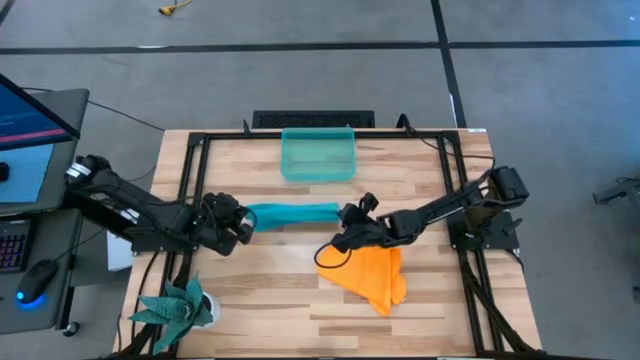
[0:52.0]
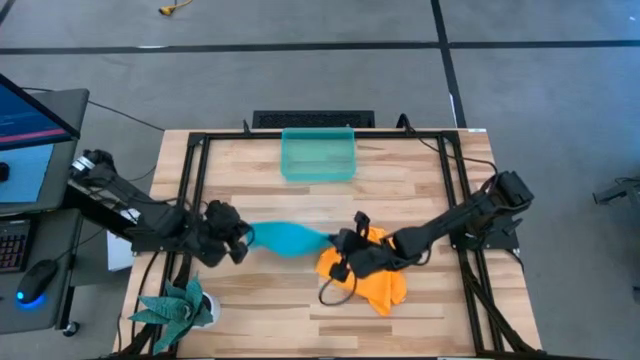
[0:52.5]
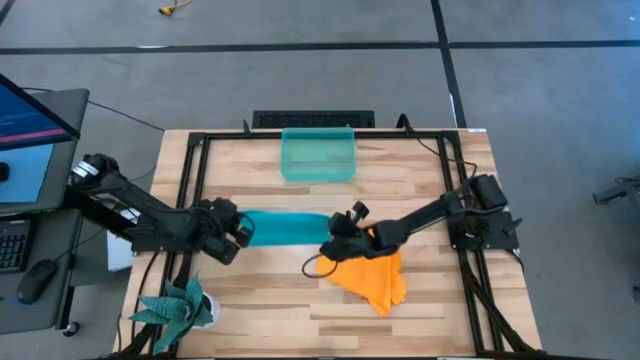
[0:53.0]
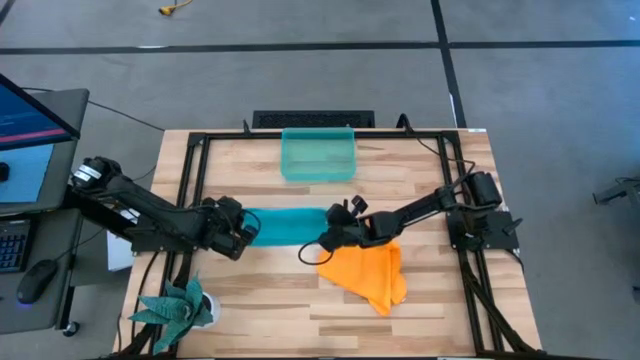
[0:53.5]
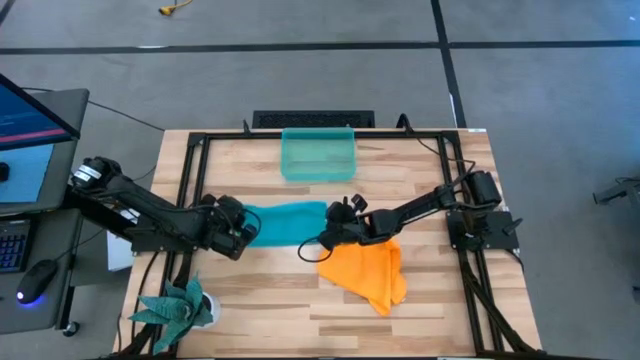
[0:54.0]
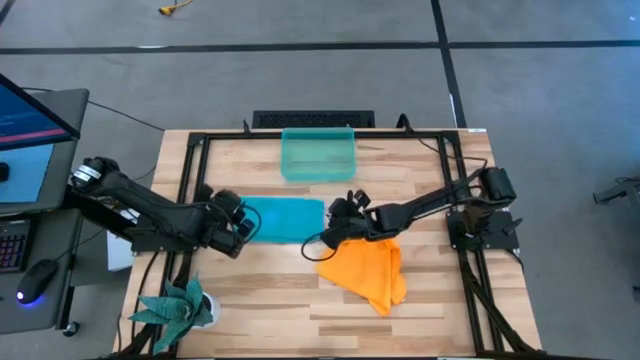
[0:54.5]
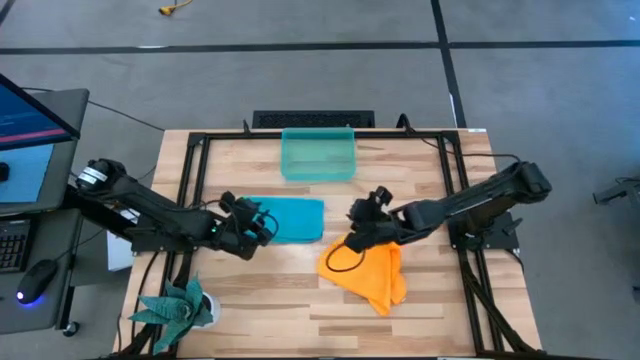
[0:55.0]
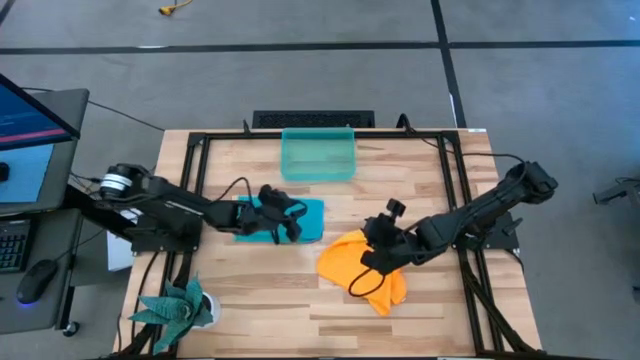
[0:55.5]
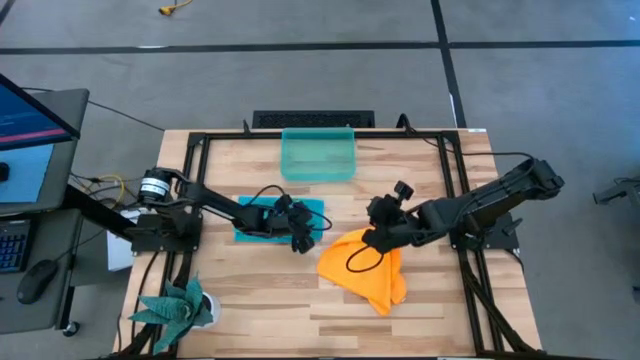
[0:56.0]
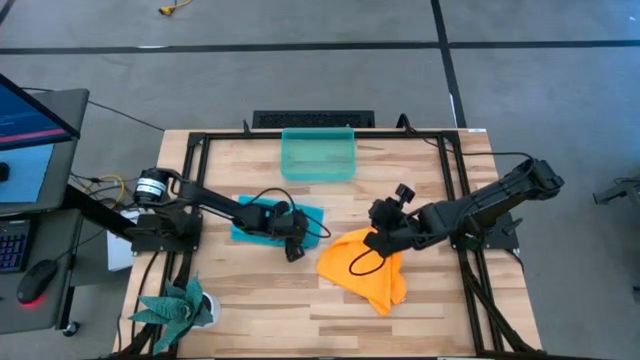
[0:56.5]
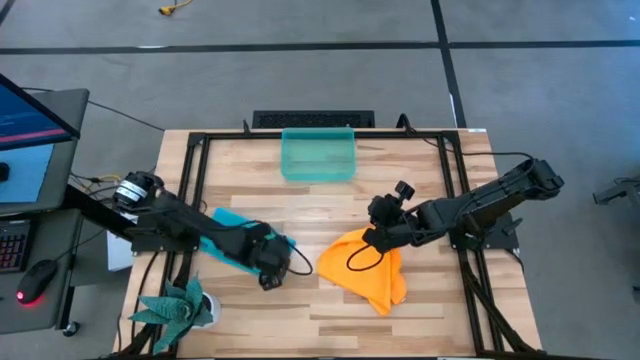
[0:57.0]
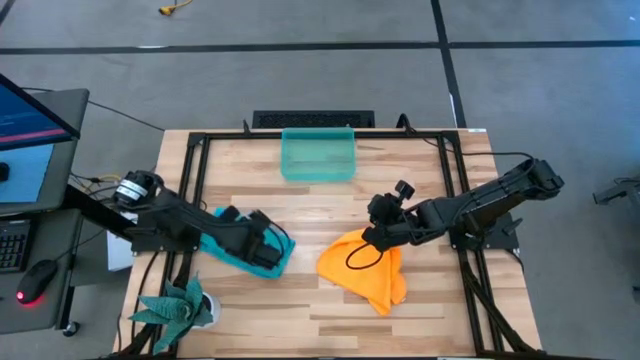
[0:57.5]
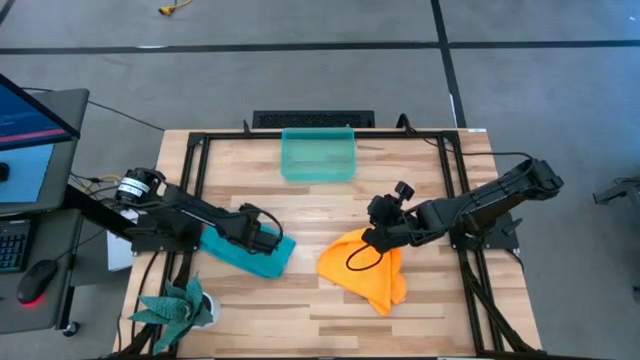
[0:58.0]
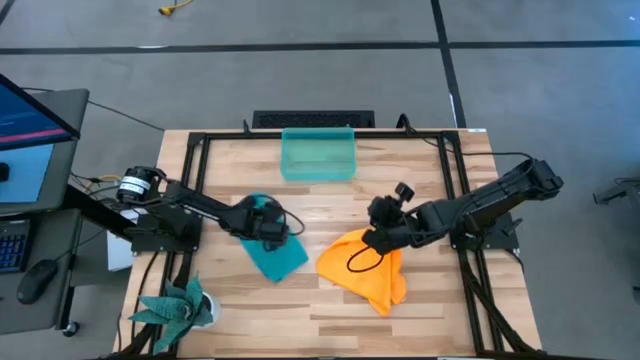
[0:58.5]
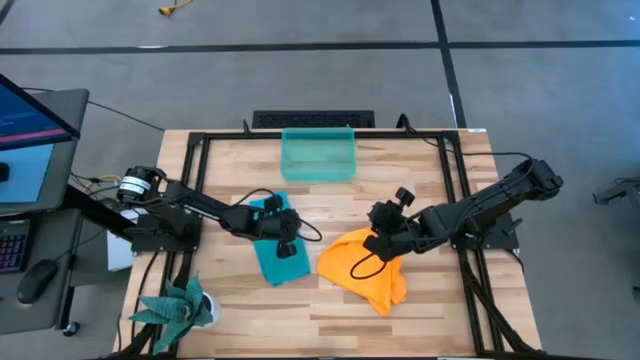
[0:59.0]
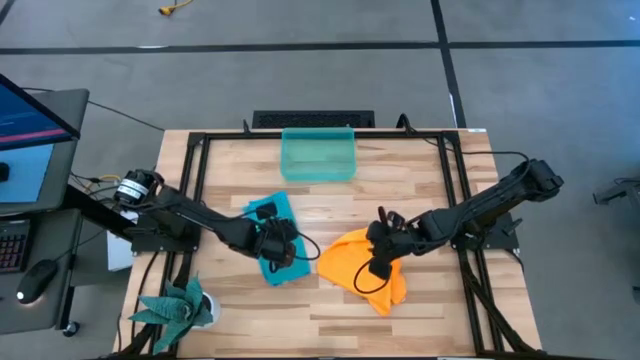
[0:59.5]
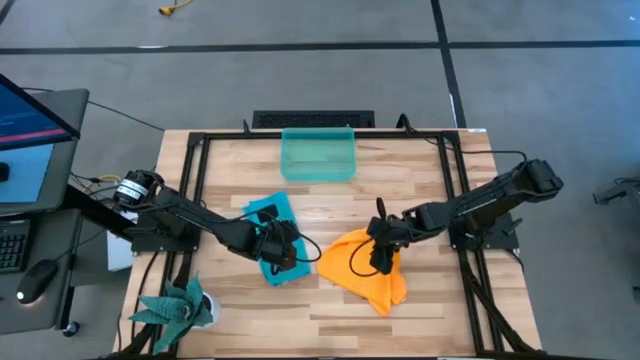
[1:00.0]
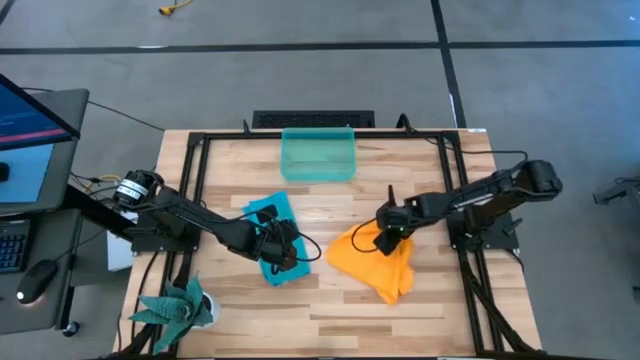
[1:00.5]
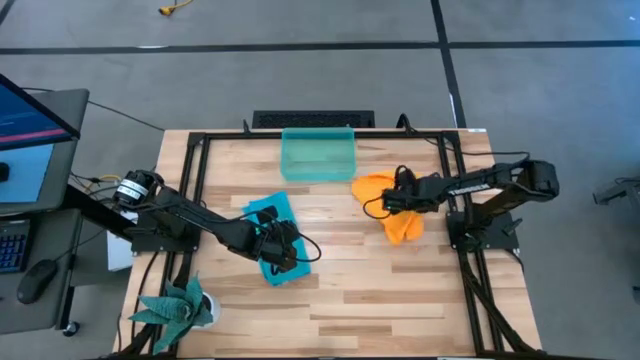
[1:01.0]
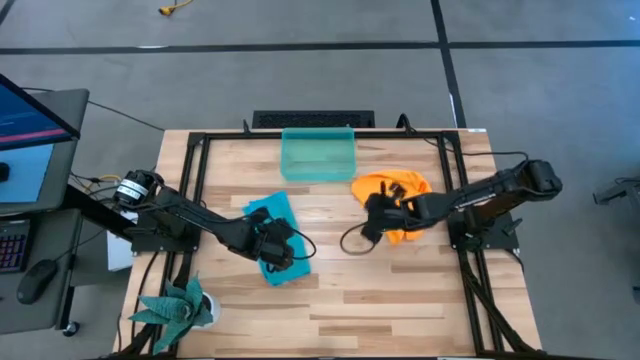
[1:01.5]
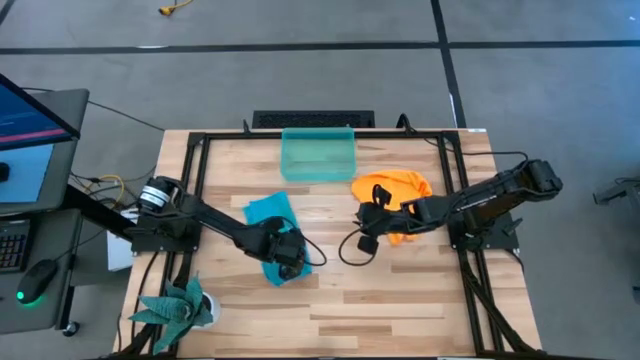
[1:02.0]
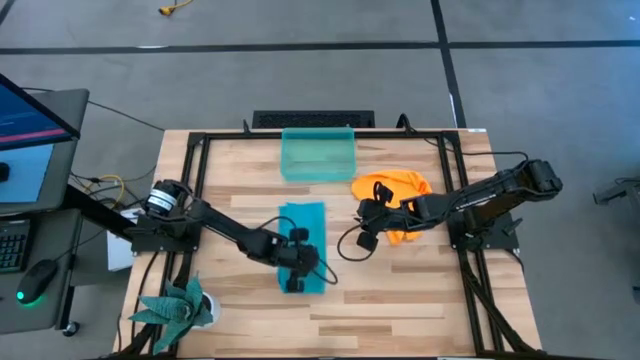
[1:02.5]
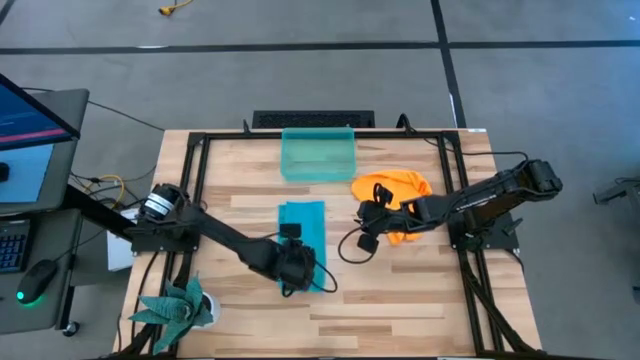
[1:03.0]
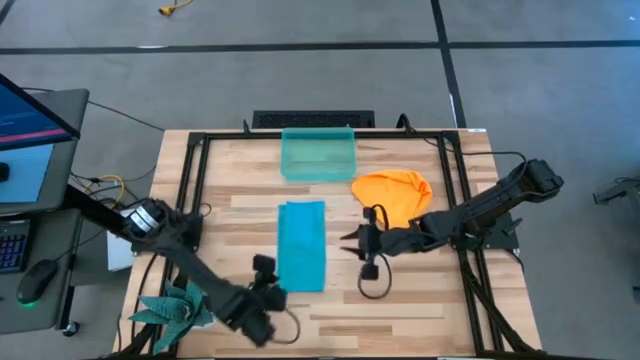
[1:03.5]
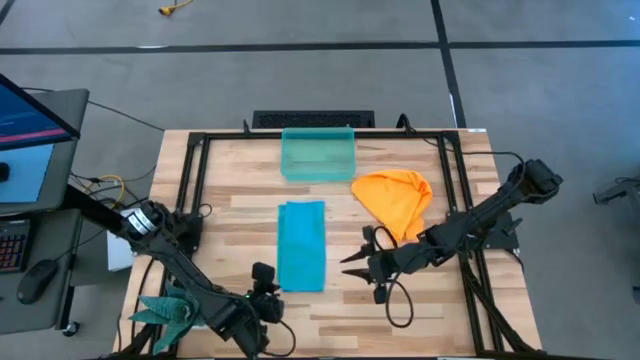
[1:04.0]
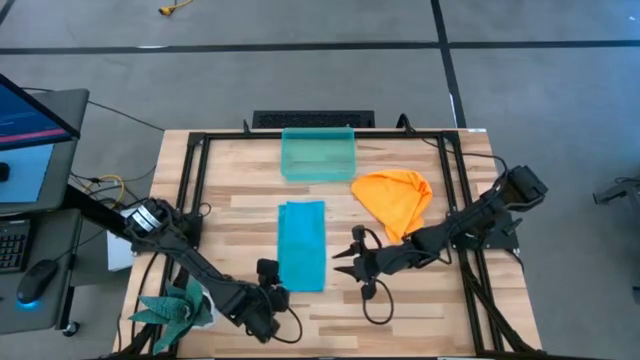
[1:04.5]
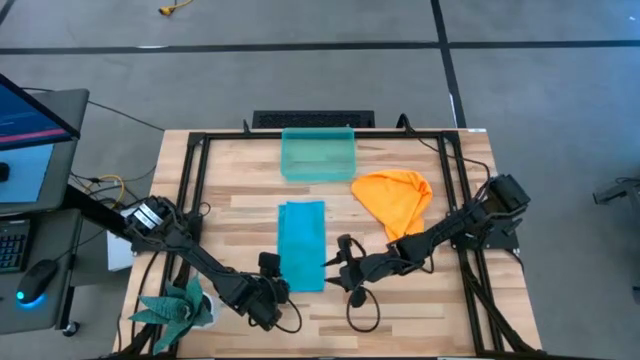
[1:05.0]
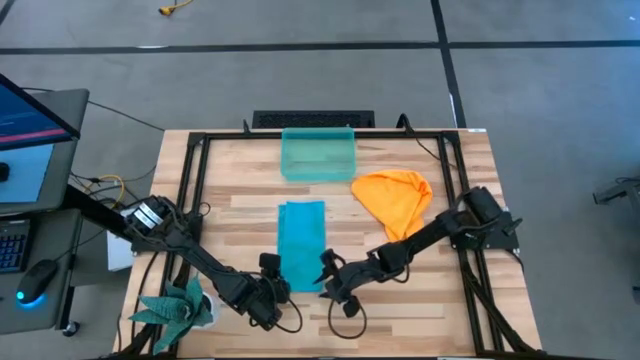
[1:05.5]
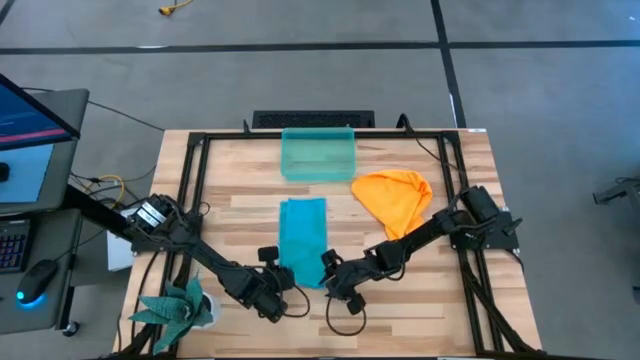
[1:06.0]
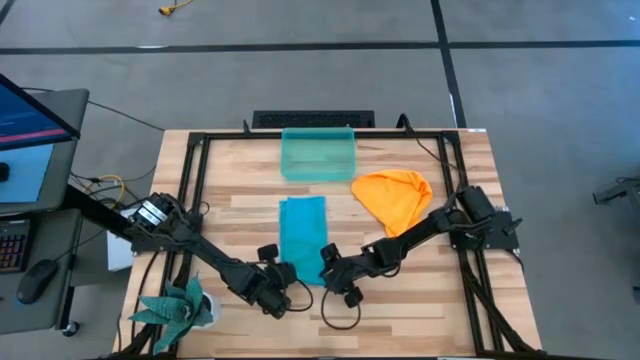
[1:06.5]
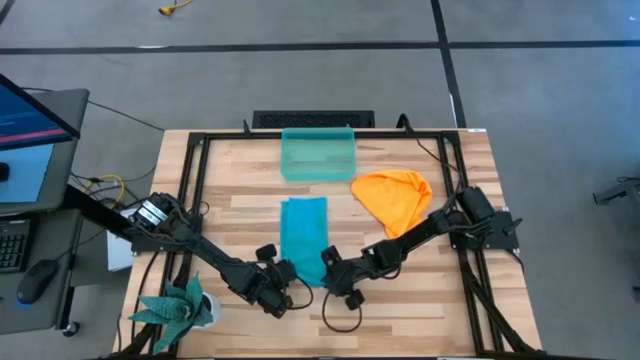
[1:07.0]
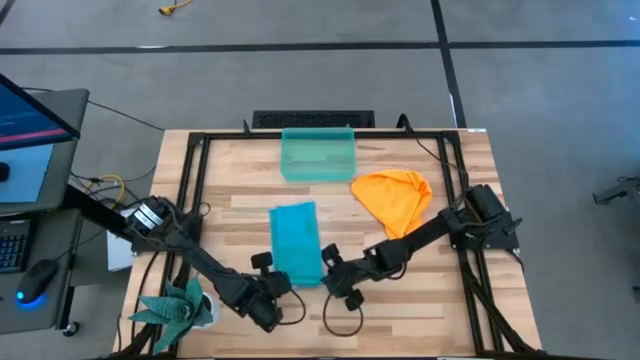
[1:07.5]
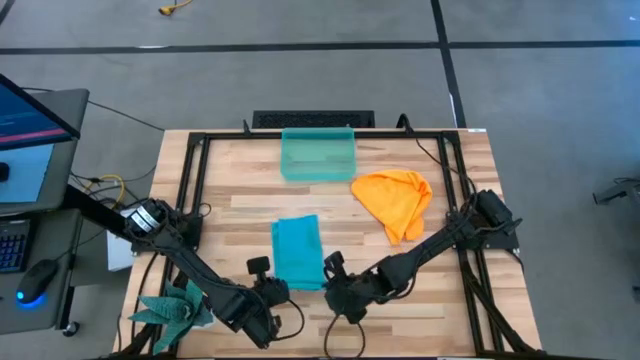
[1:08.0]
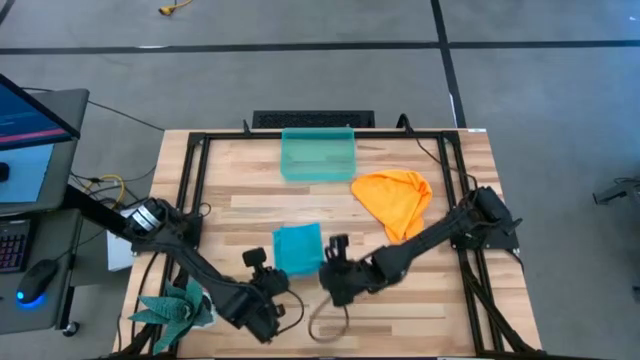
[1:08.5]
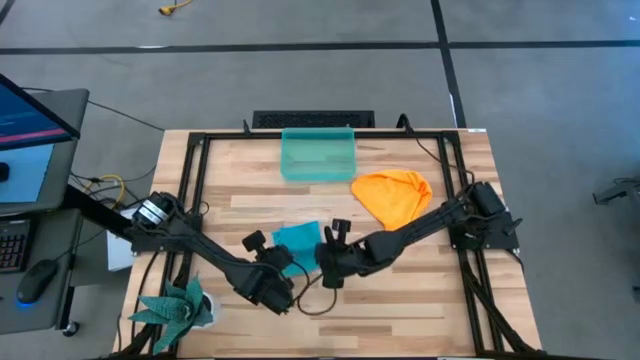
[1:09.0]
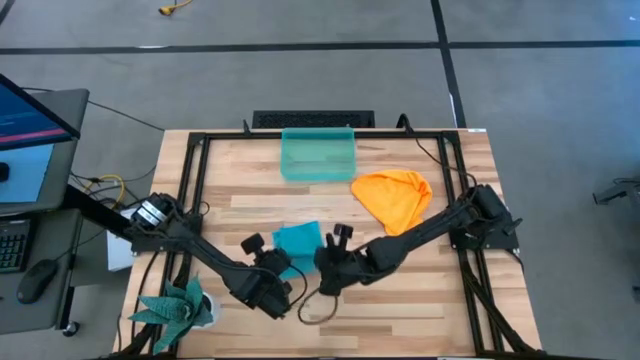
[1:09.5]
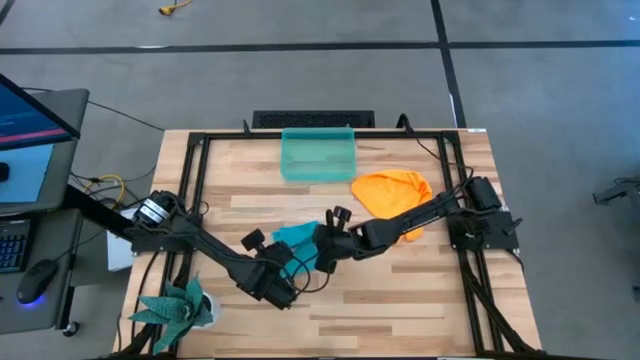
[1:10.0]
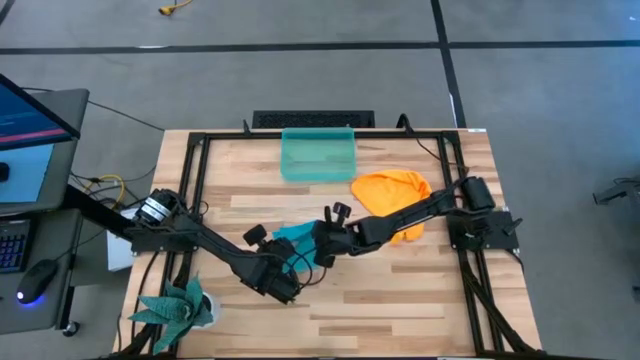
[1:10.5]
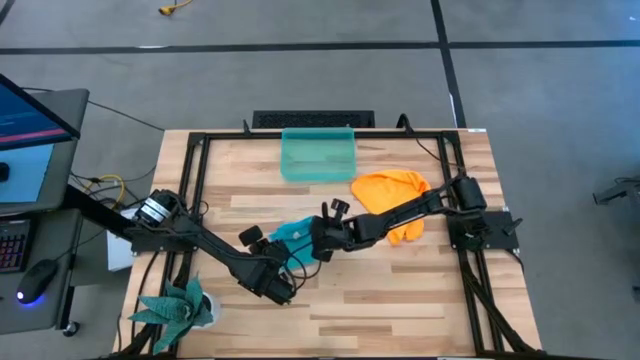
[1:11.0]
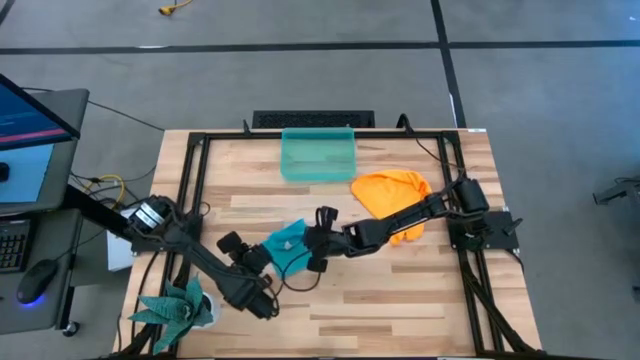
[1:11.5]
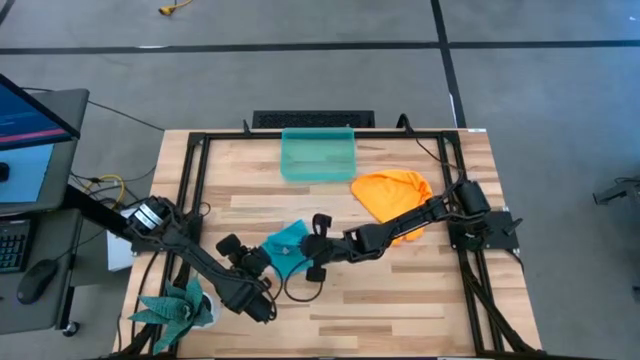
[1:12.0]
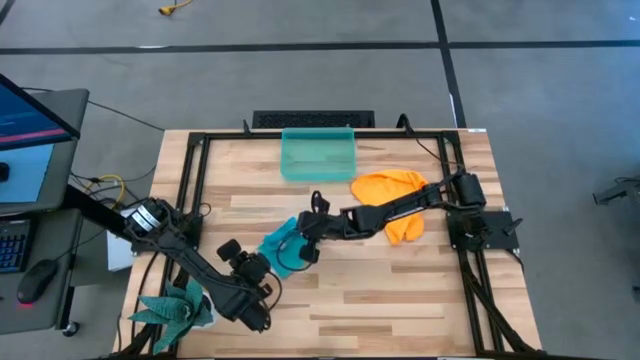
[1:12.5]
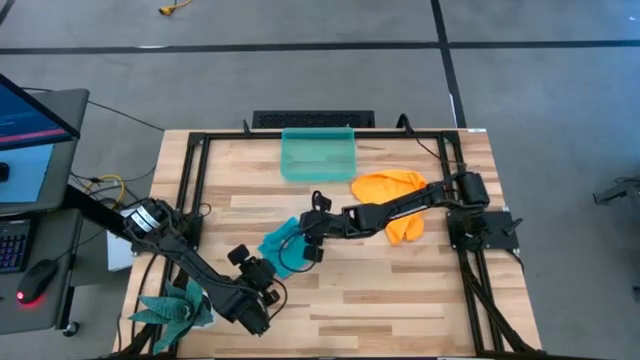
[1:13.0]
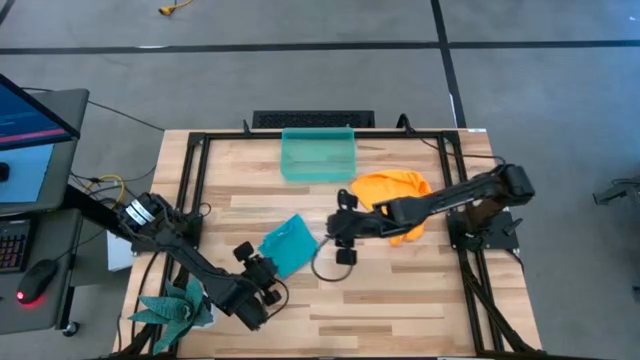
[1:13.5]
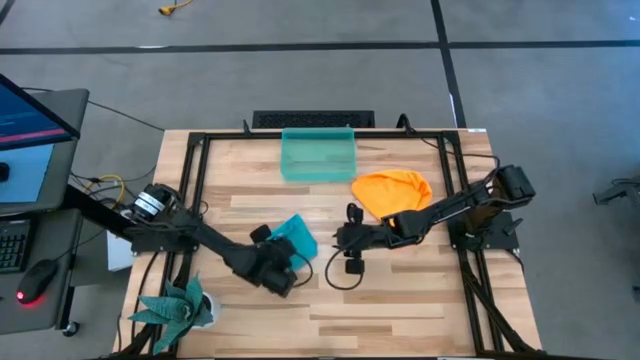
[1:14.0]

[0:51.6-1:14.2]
Task: Roll microfiber towels into tight, uniform cylinder then place into a basket
Fold the blue microfiber cloth
